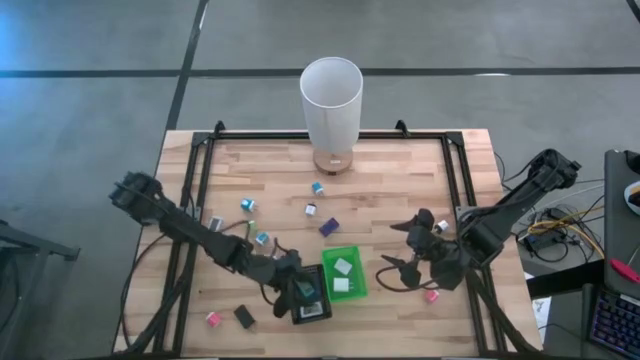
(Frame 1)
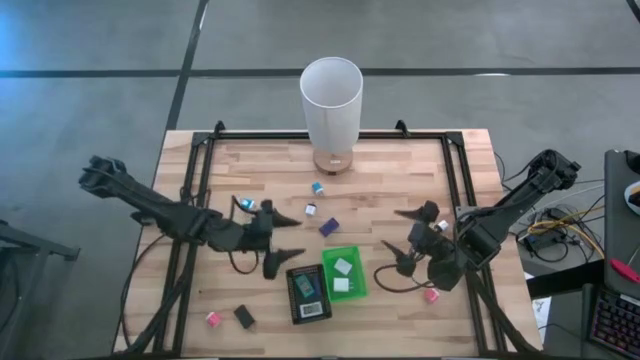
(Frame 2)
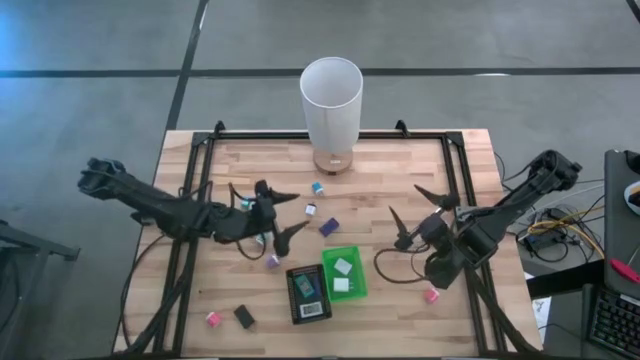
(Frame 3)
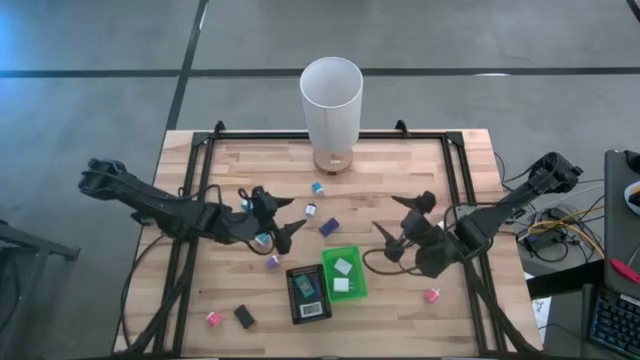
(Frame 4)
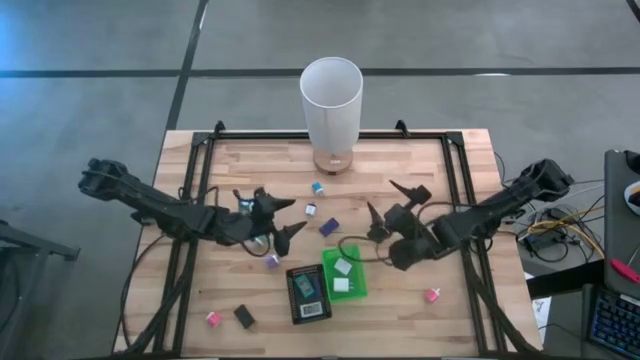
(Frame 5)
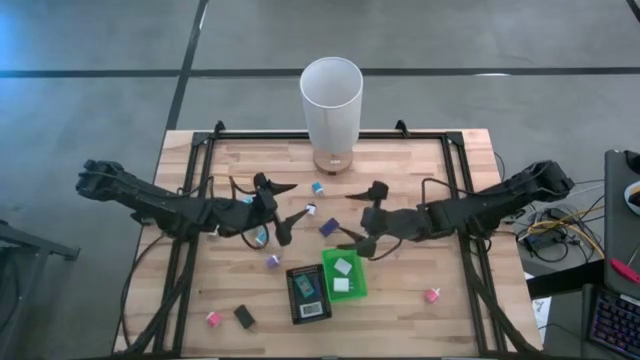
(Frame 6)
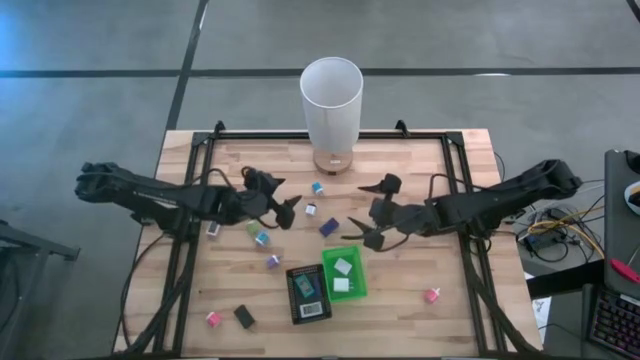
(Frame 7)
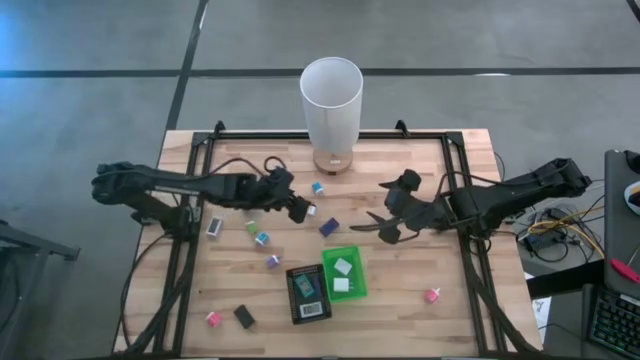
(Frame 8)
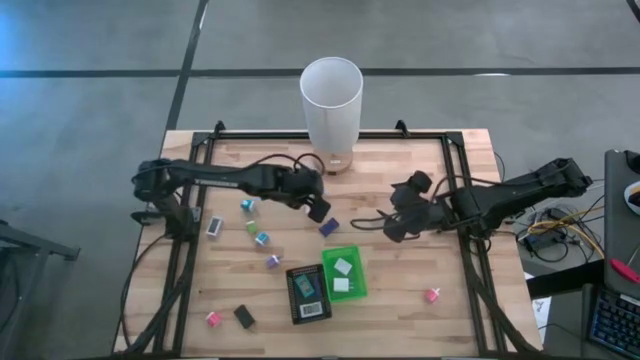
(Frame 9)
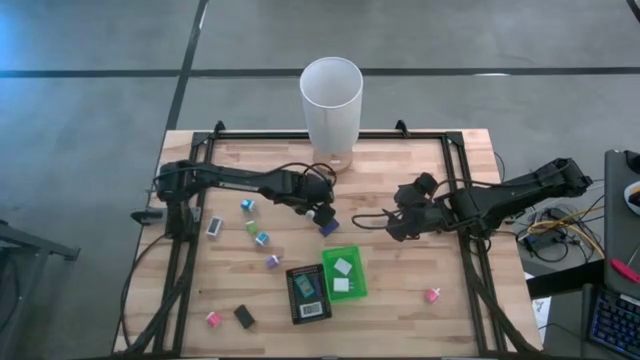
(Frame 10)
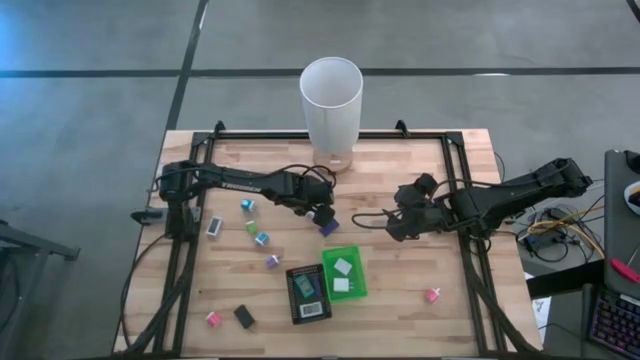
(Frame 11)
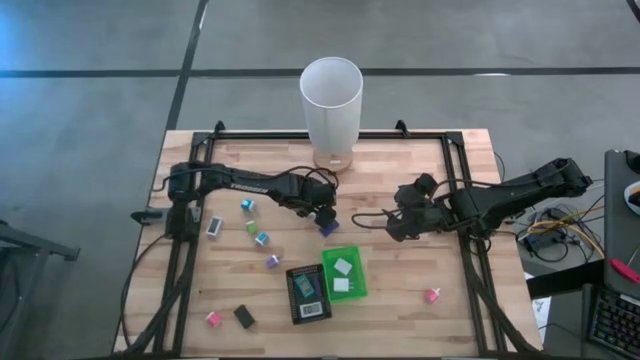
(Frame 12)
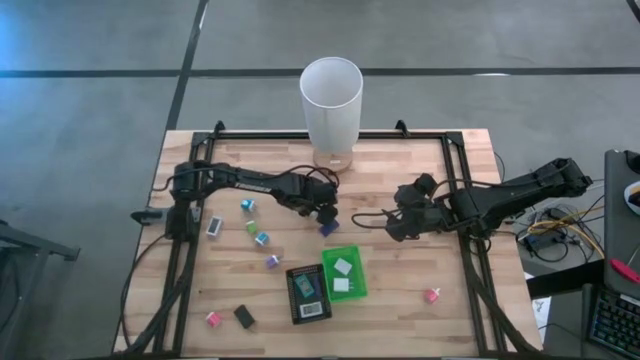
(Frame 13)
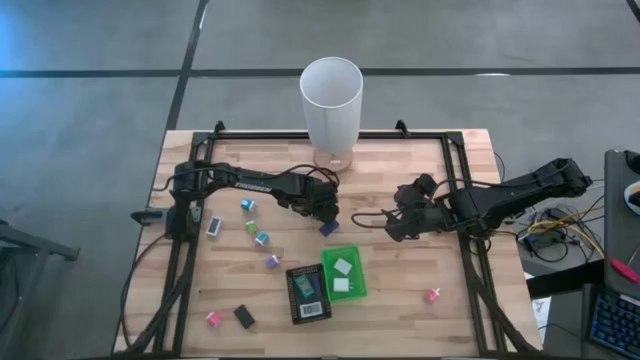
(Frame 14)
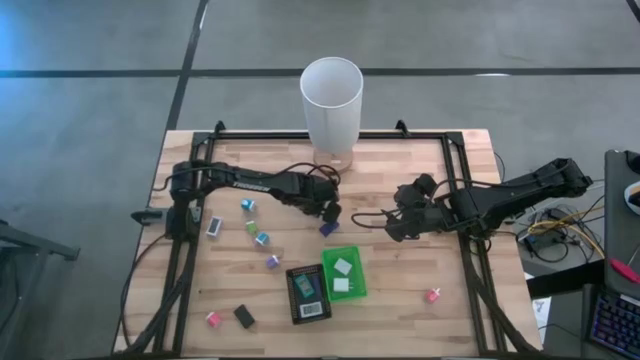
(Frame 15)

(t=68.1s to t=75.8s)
Task: Pick & Place Office items
Put the white black charger adapter into the green bin

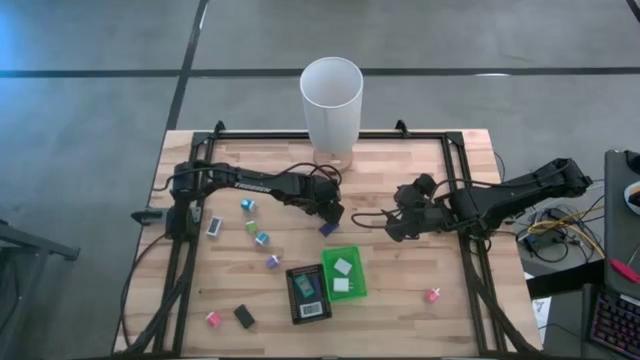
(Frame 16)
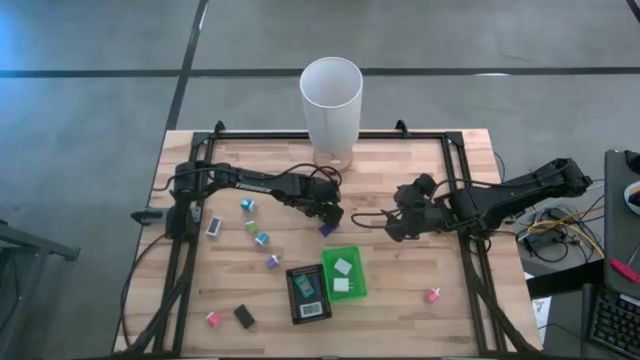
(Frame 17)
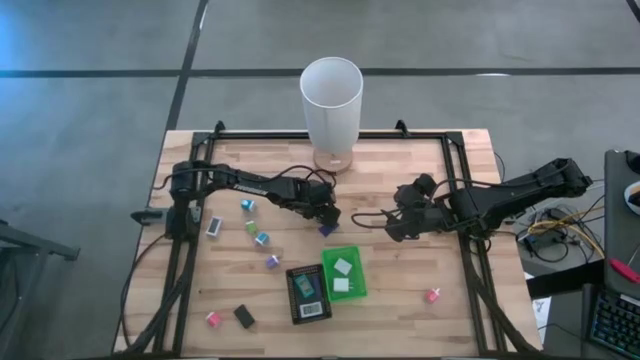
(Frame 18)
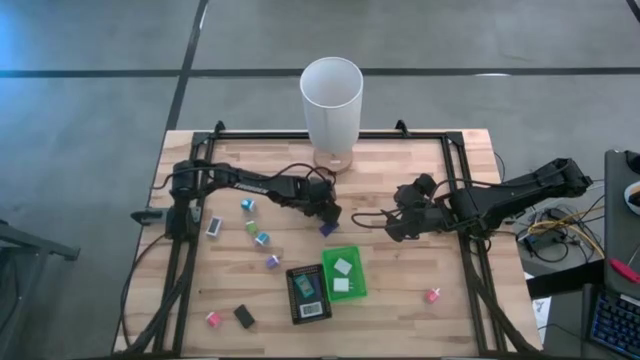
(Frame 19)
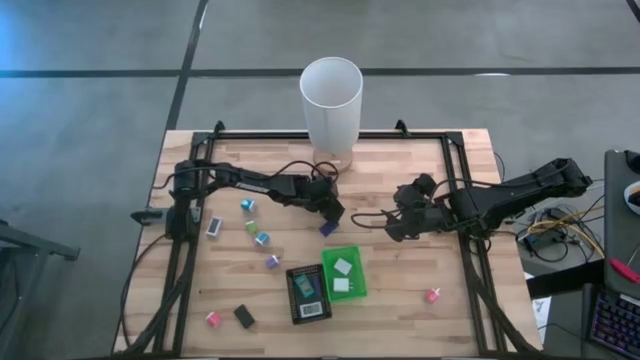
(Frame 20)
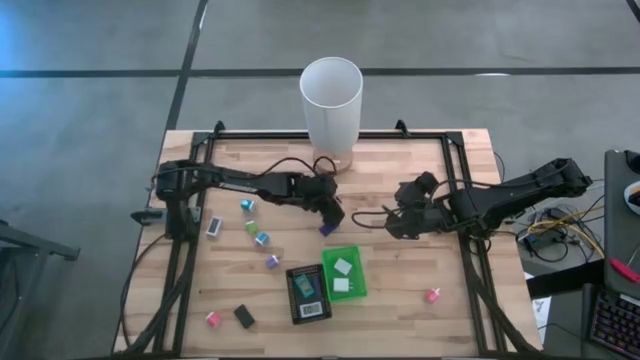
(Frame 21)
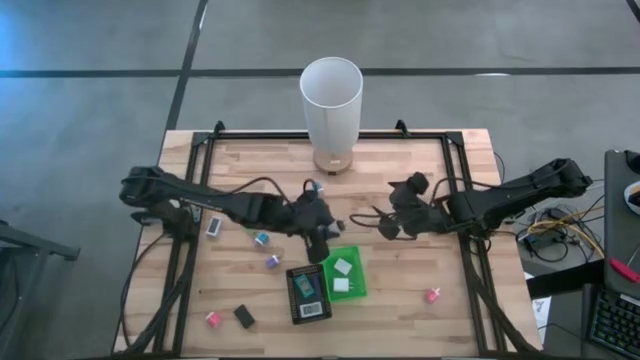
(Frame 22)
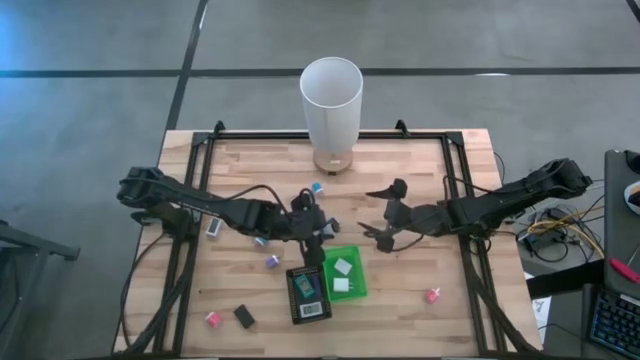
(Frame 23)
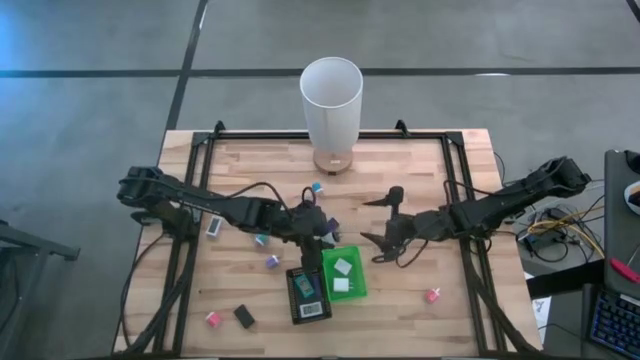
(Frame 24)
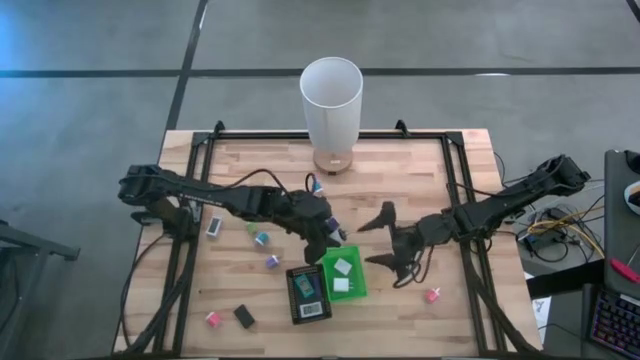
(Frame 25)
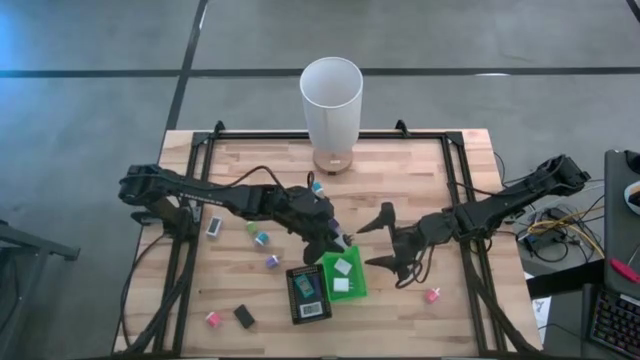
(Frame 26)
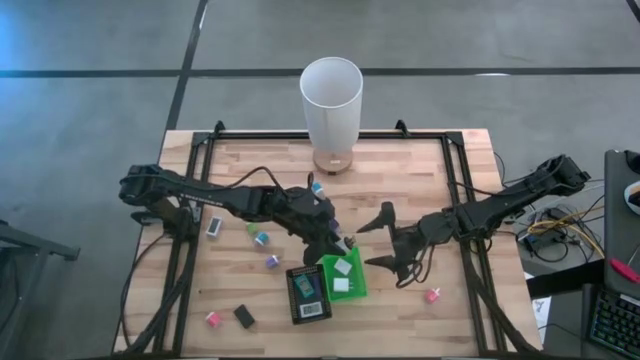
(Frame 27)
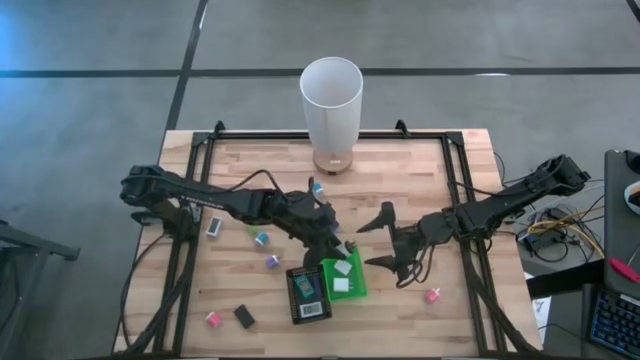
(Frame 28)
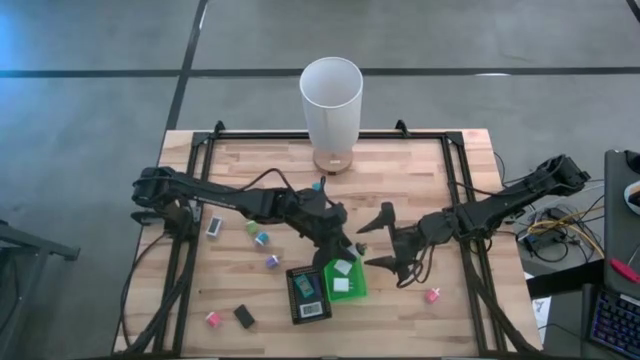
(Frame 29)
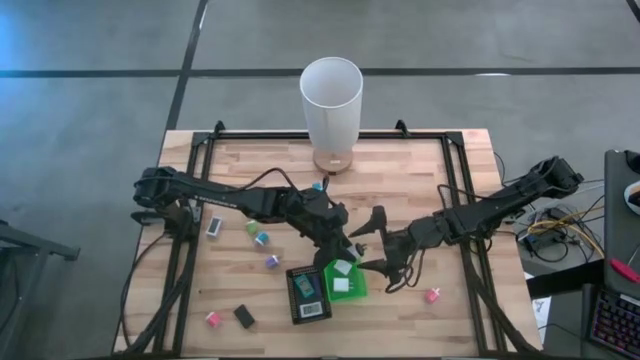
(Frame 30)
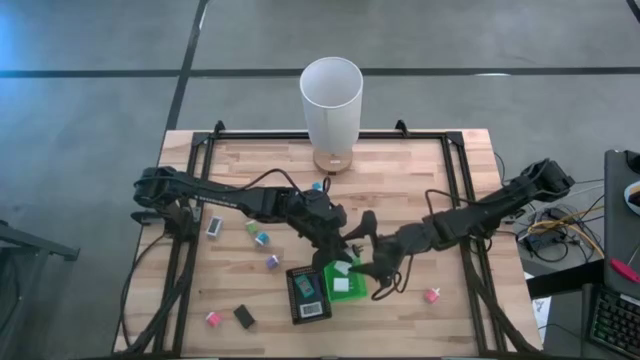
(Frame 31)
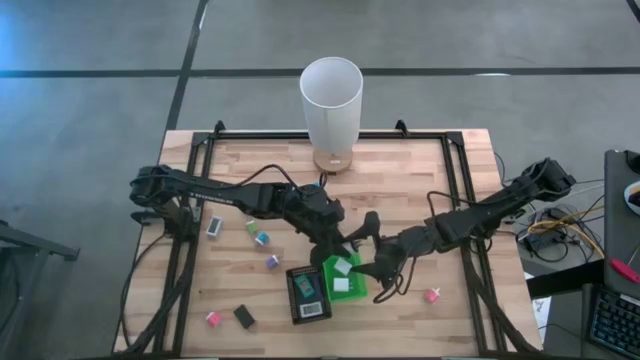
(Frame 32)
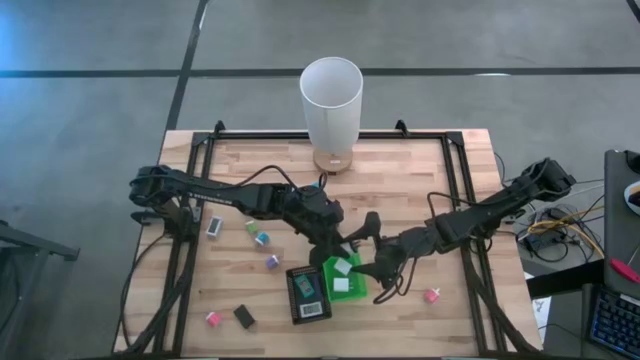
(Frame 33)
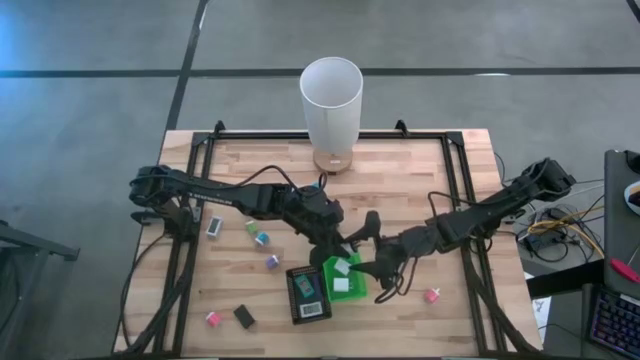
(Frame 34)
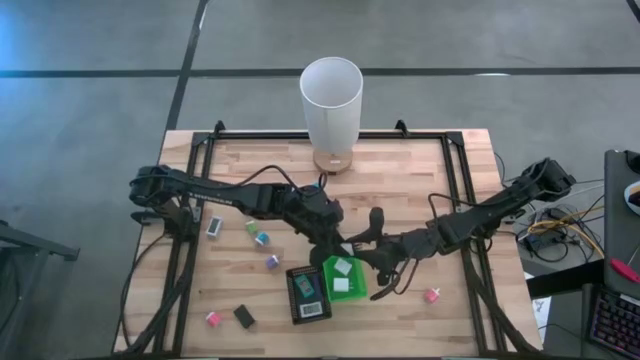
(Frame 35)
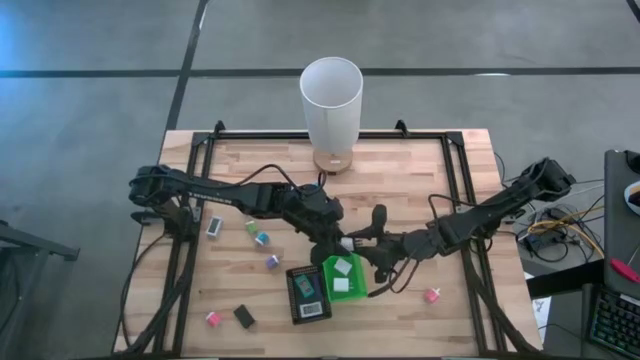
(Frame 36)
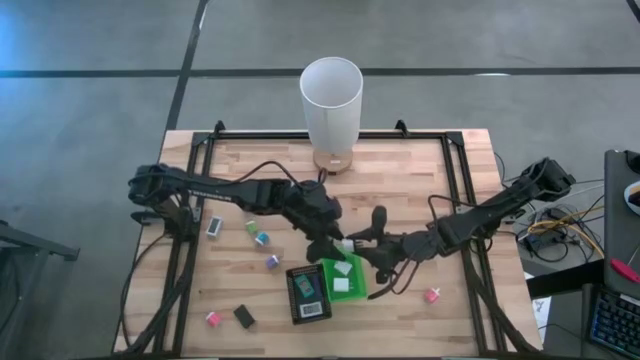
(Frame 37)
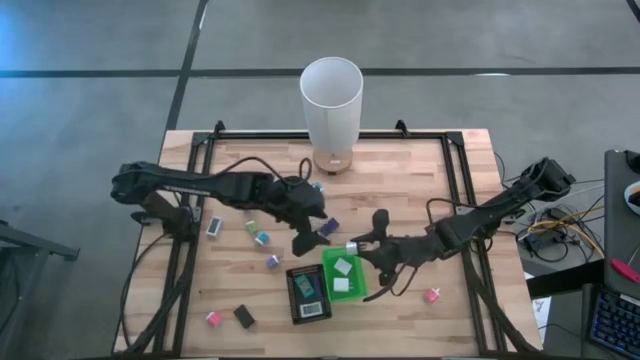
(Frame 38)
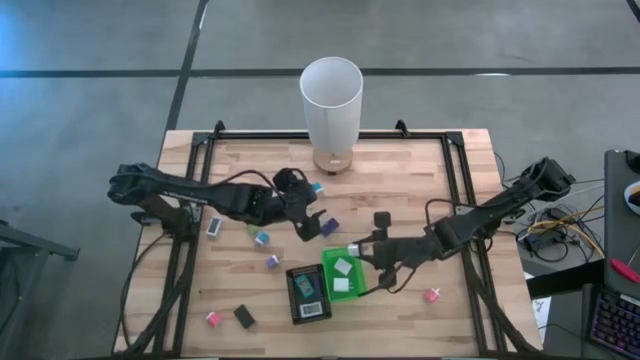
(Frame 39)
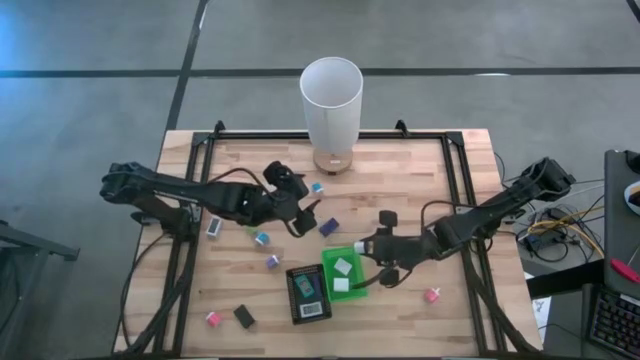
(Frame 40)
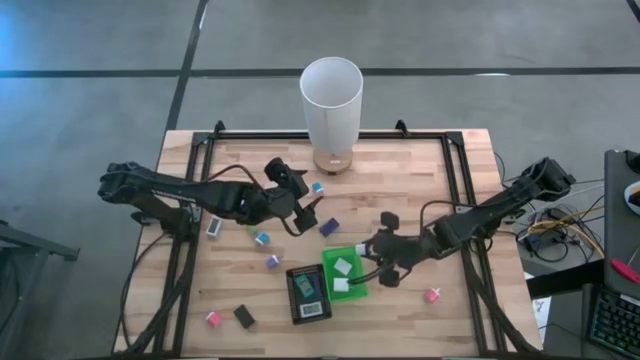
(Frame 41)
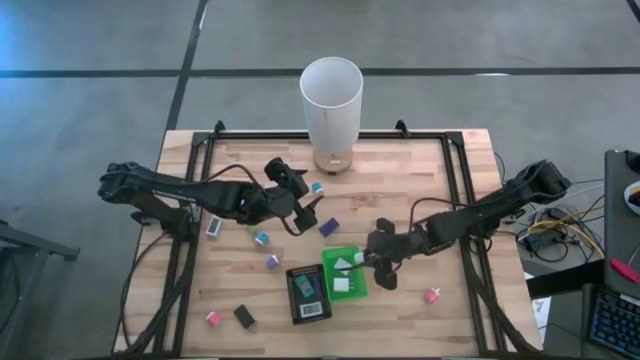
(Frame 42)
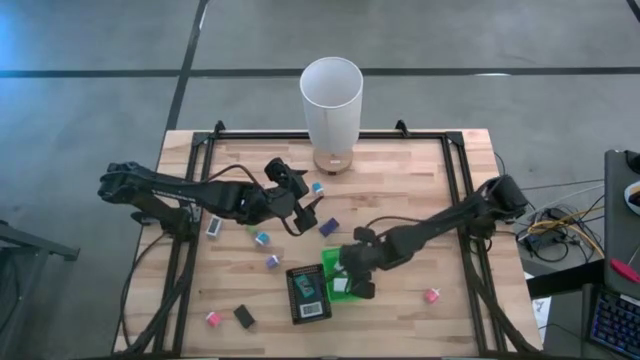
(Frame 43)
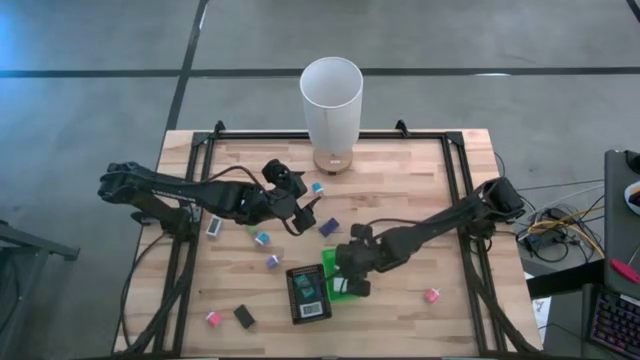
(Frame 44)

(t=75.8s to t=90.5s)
Put the white black charger adapter into the green bin
